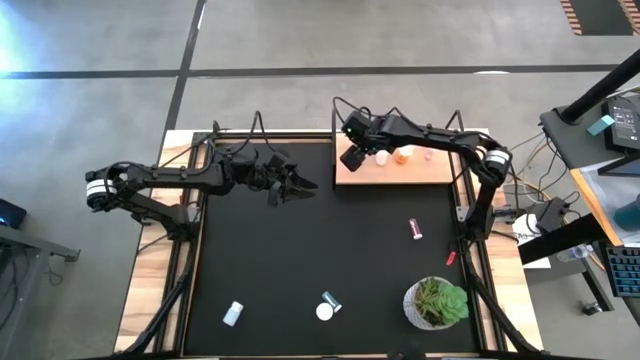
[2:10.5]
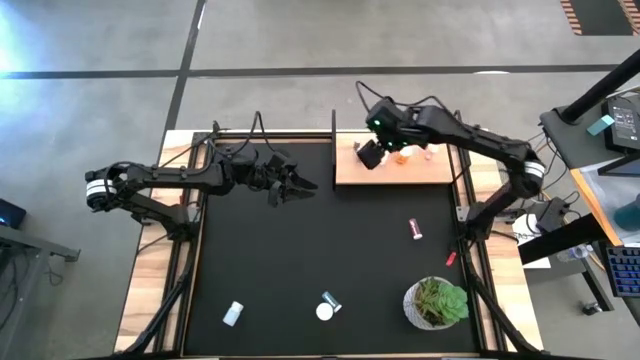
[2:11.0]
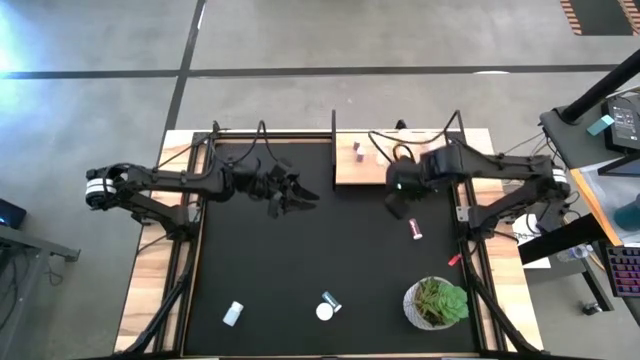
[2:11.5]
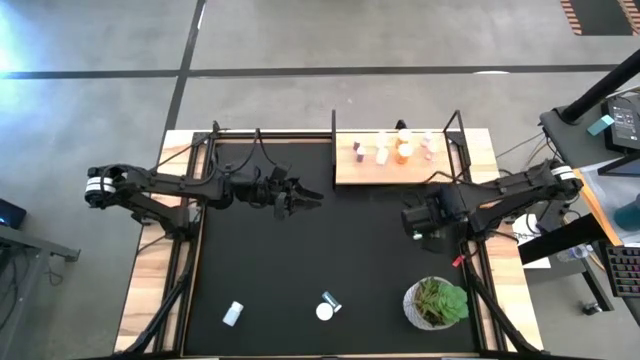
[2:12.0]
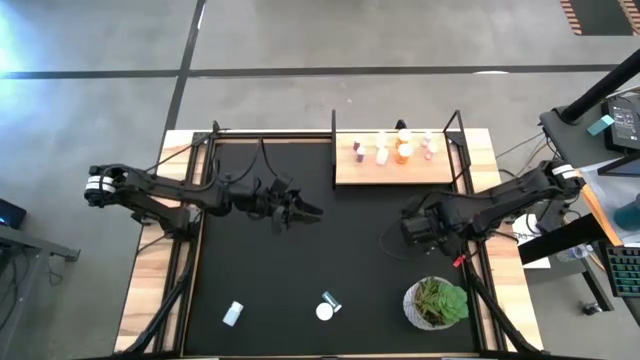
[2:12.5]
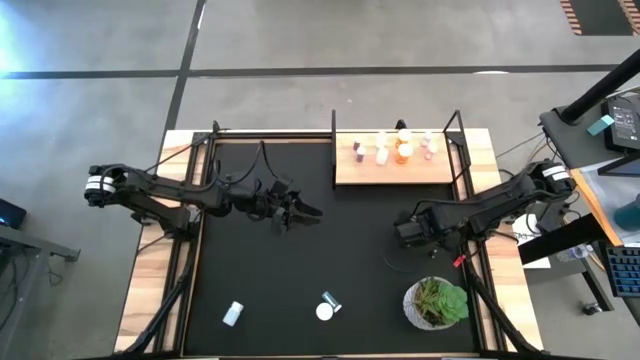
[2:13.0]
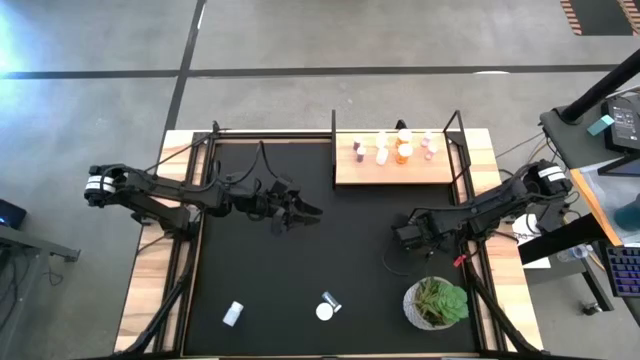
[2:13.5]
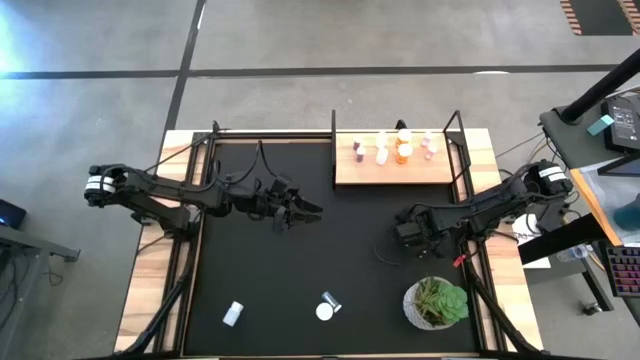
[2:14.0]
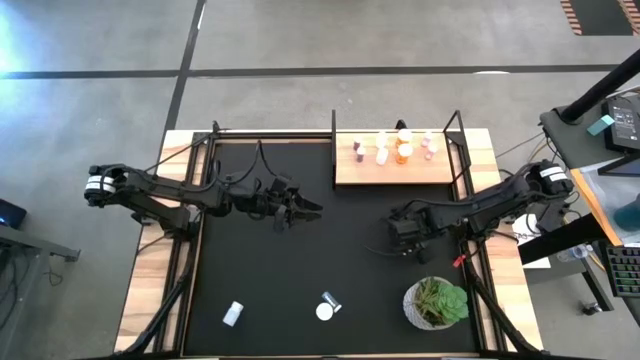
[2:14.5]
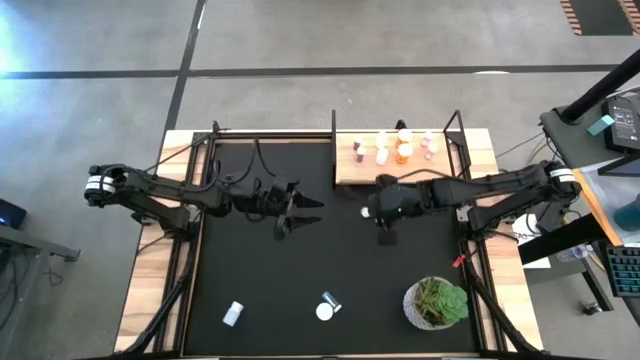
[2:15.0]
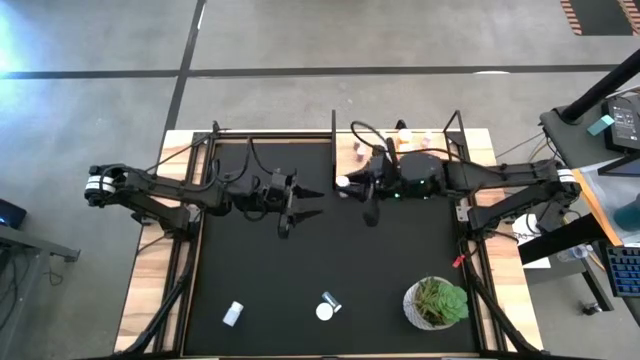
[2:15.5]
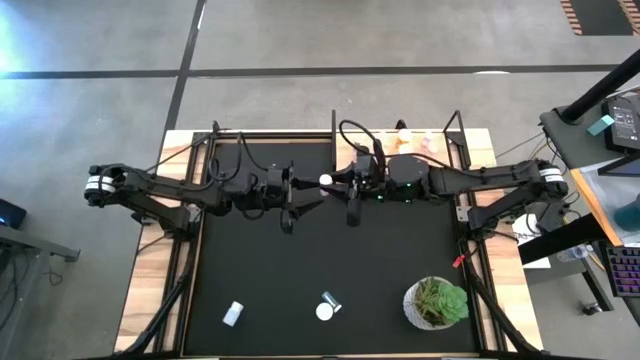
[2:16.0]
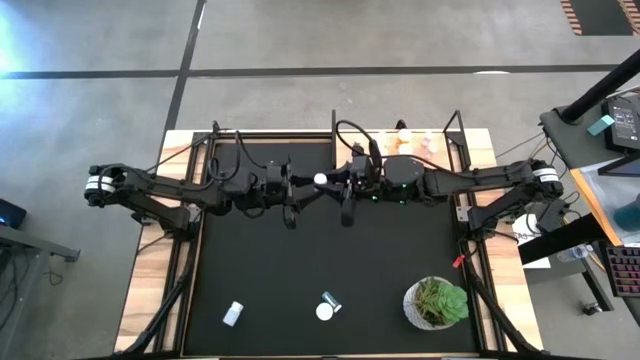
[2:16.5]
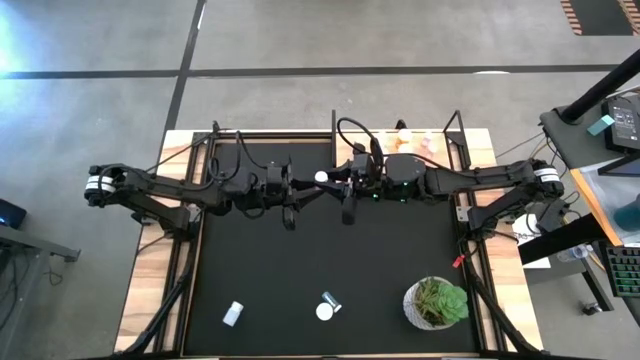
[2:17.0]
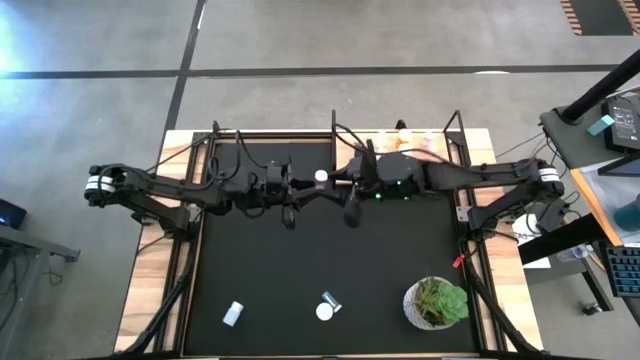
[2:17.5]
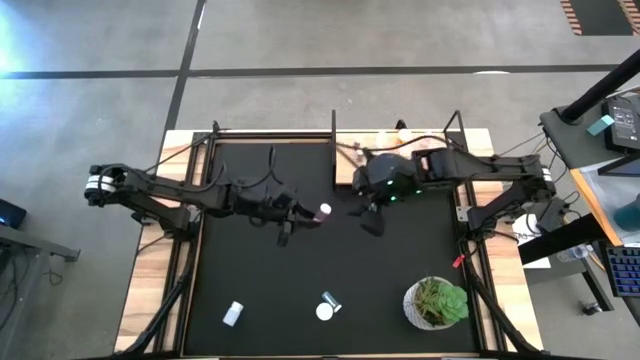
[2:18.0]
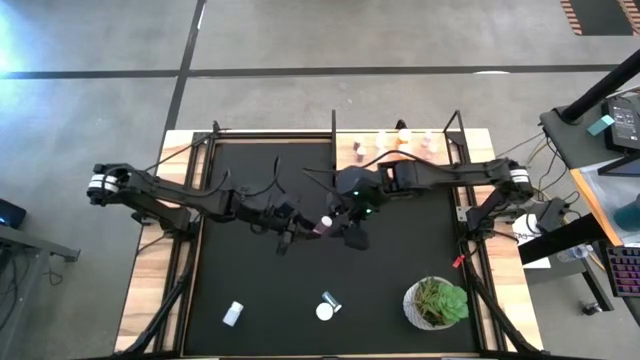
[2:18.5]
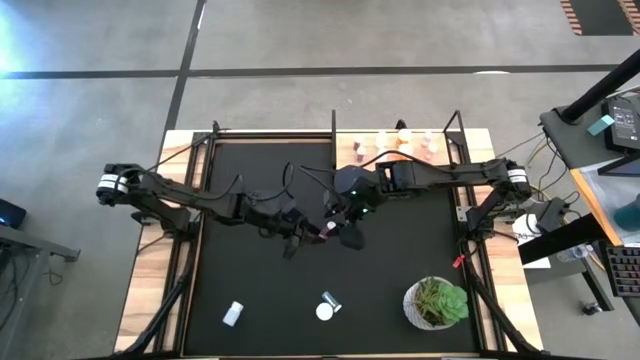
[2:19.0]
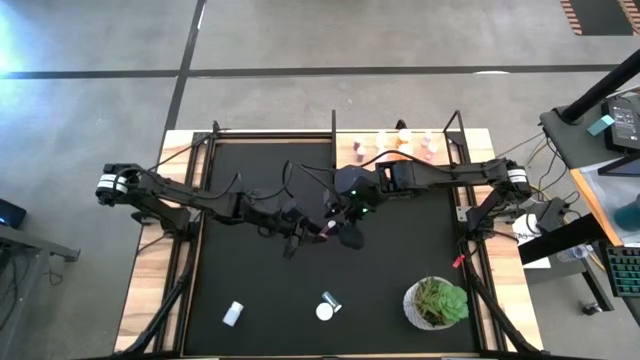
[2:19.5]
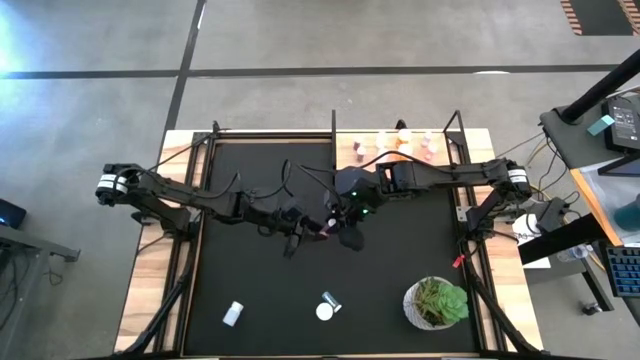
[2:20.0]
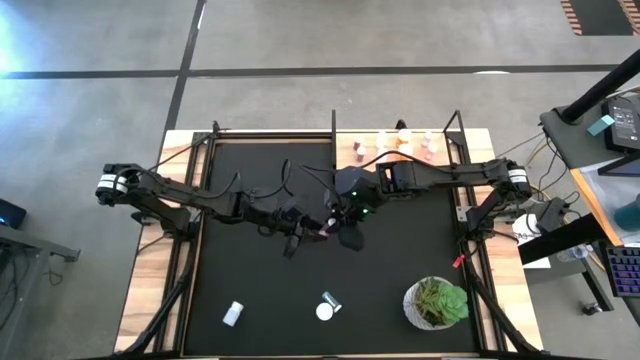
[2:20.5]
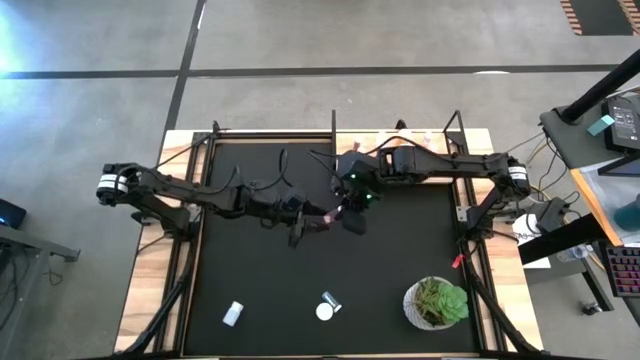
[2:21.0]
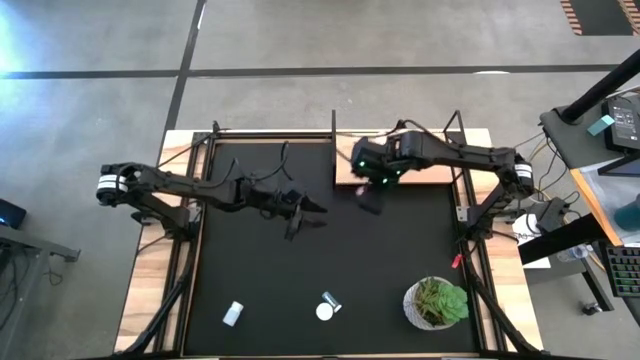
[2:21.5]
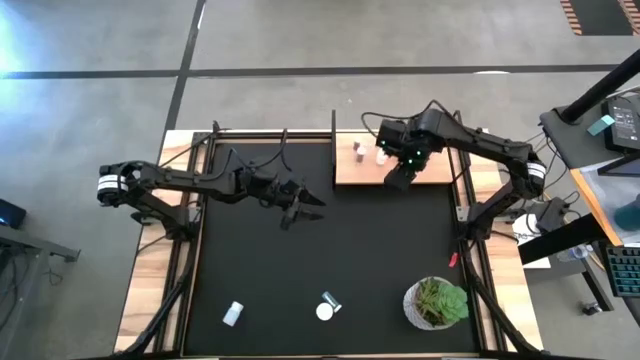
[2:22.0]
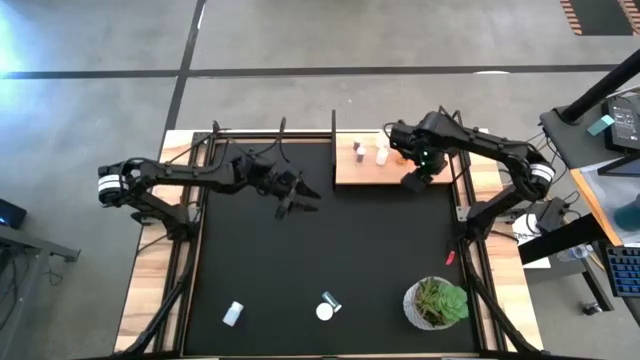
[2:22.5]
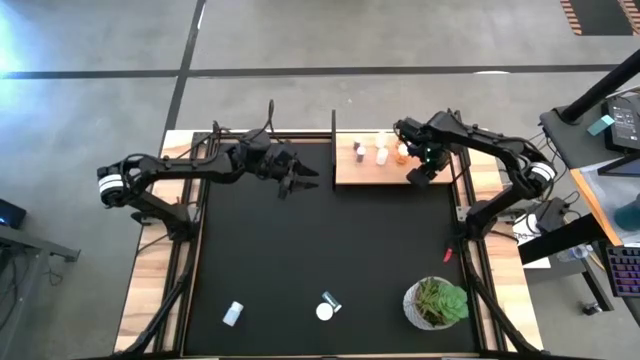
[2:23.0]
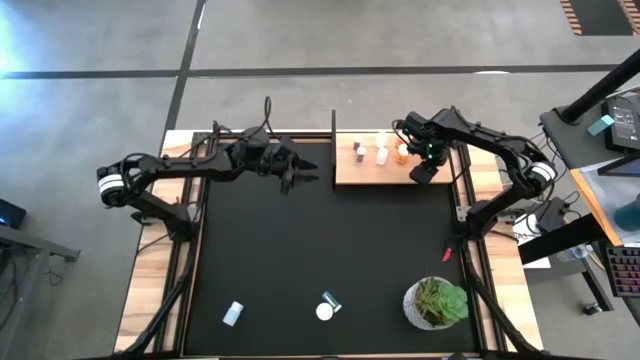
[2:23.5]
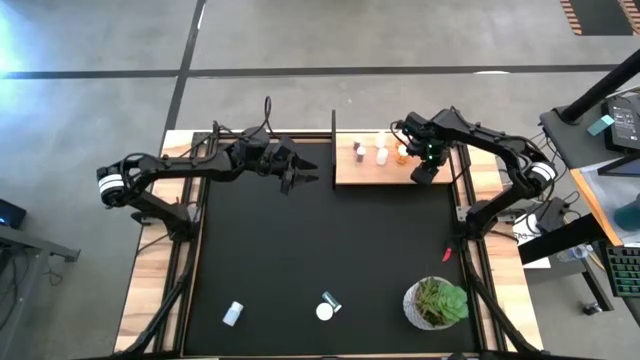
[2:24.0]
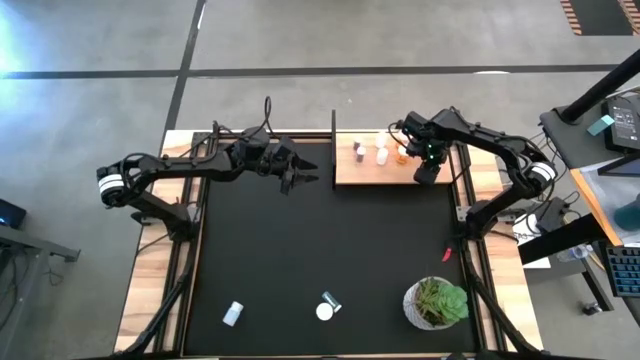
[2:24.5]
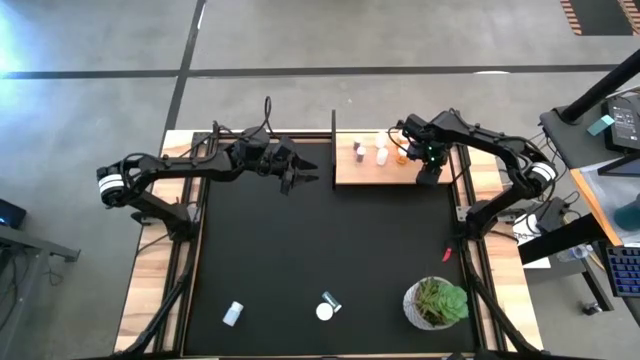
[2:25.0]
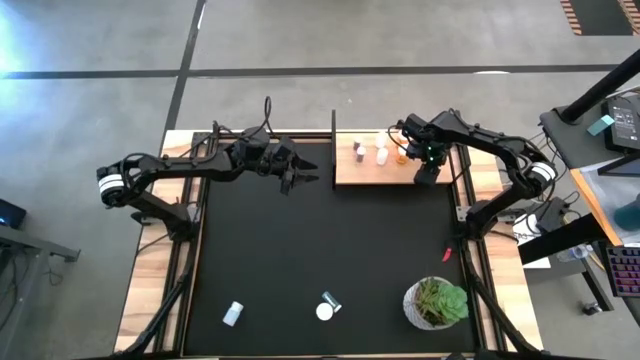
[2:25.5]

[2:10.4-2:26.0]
Task: Pick and place medicine bottles onto shelf by color
Put the pink pill bottle on the shelf aligned with the other pink pill bottles

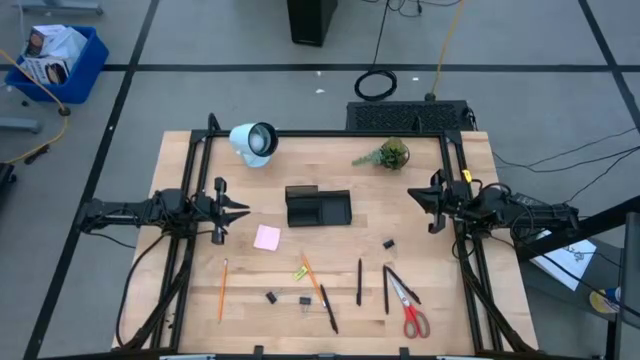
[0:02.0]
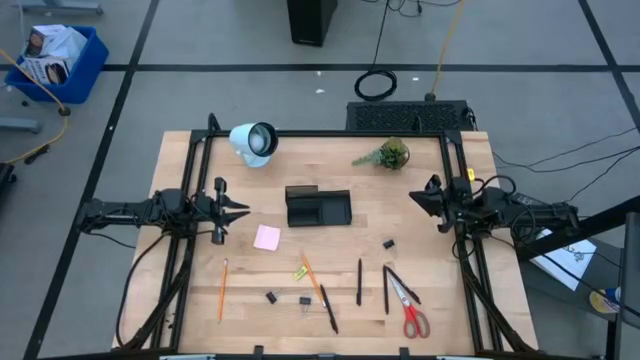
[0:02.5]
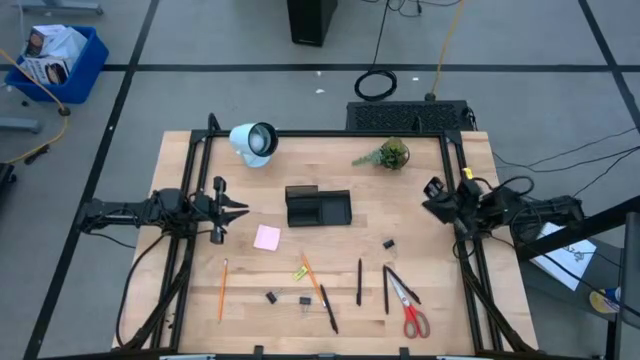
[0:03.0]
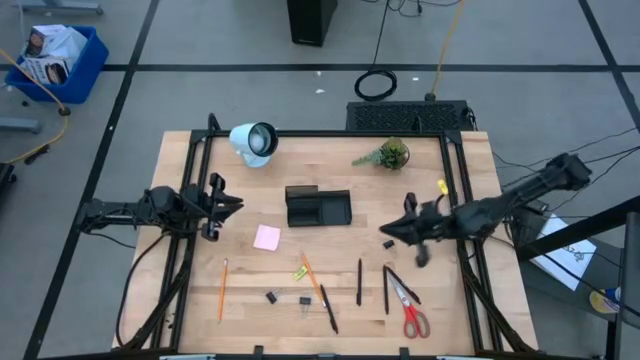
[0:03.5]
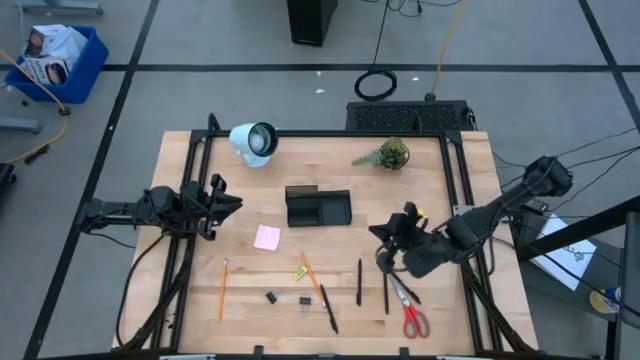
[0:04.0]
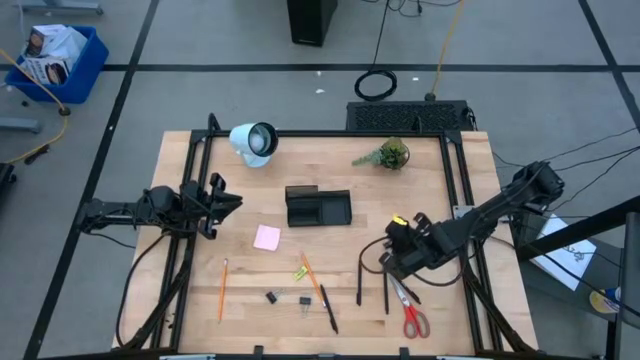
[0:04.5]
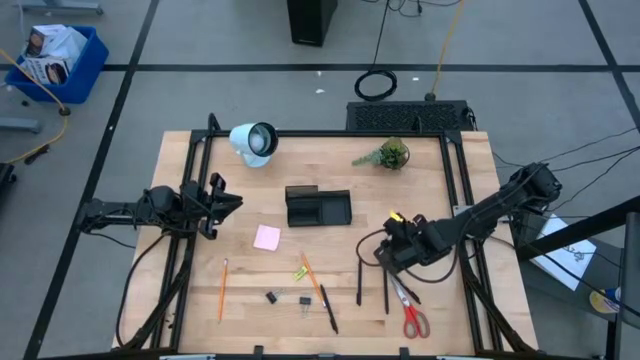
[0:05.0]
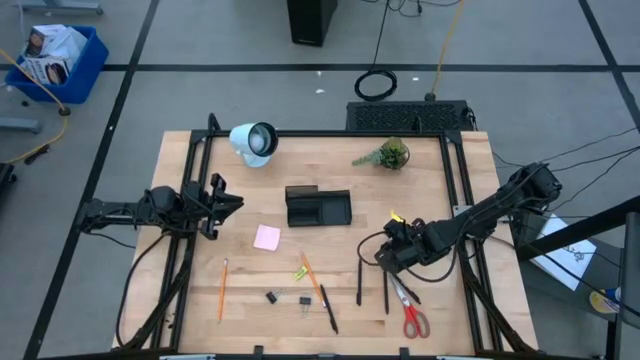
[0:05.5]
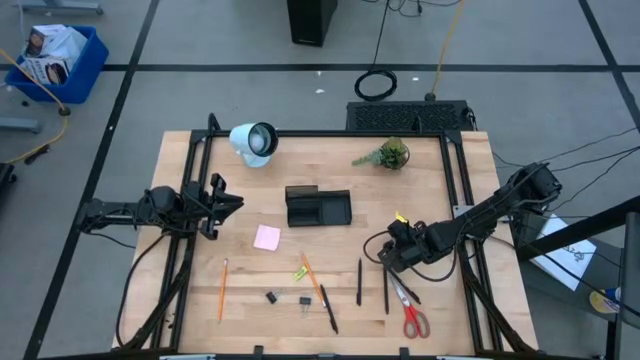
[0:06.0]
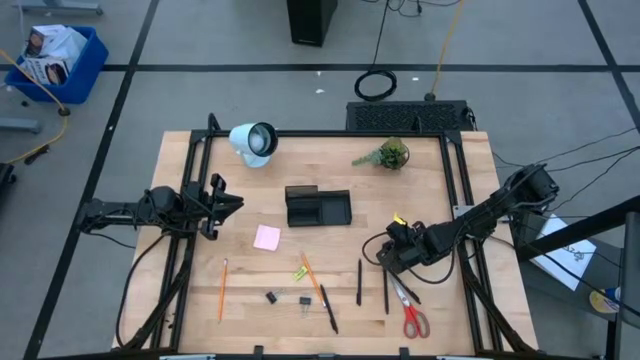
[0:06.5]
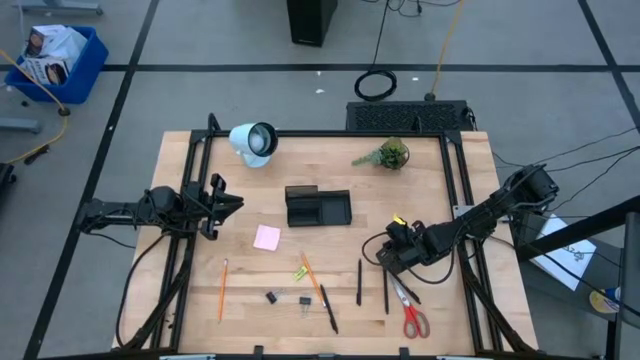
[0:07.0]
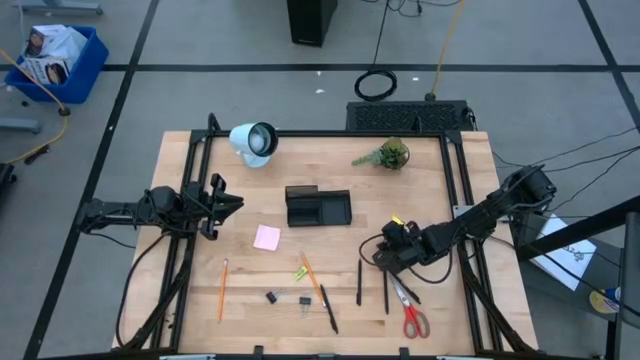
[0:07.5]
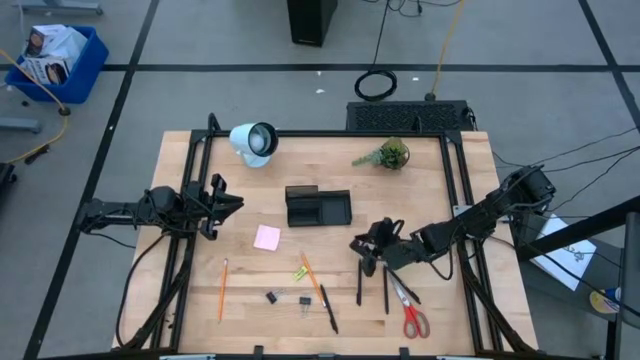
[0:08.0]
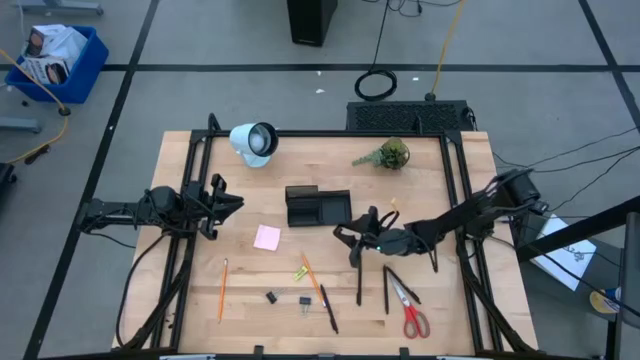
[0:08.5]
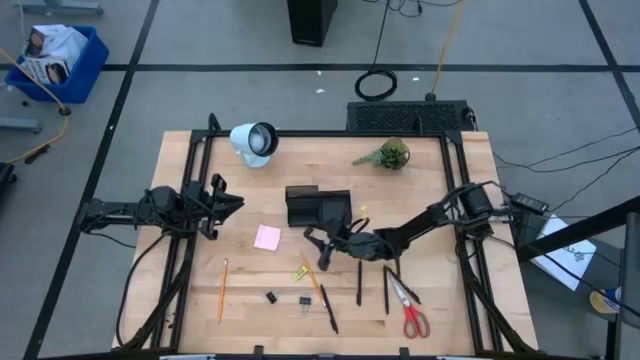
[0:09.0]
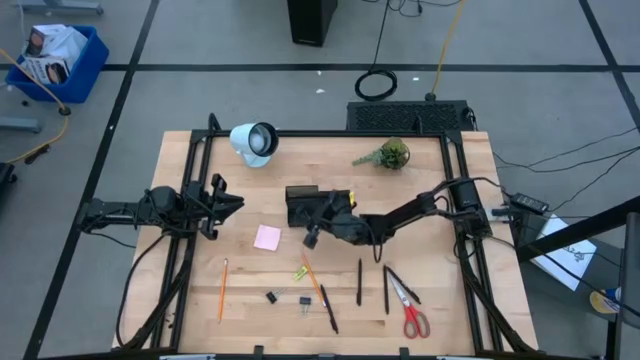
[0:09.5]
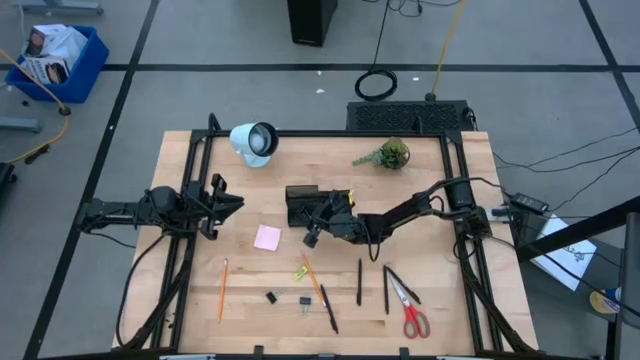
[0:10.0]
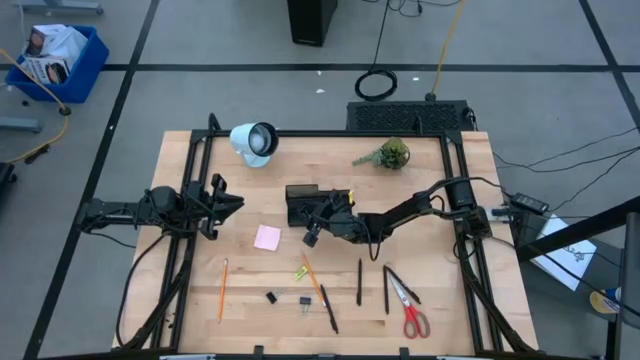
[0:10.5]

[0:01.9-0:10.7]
Task: Pick and place office supplies into organizer
Put the black binder clip into the black desk organizer
